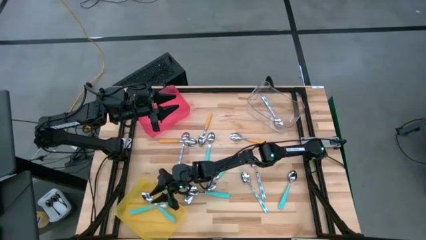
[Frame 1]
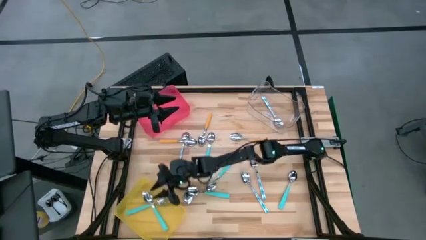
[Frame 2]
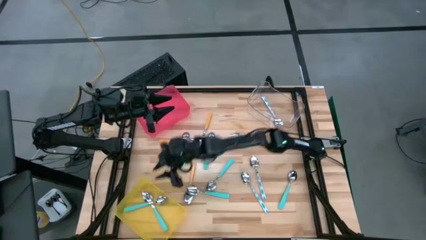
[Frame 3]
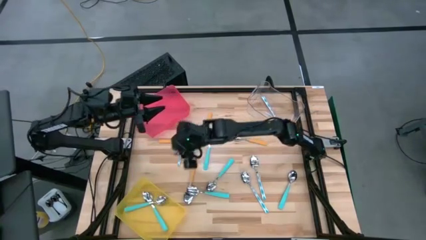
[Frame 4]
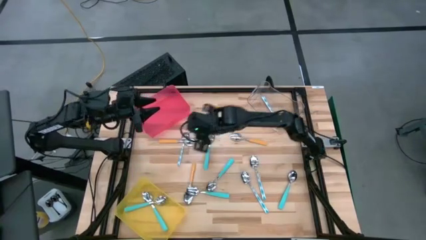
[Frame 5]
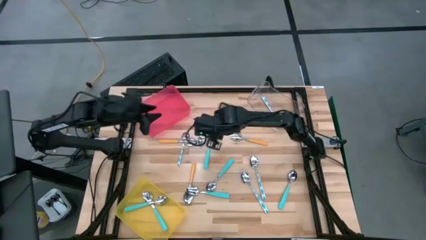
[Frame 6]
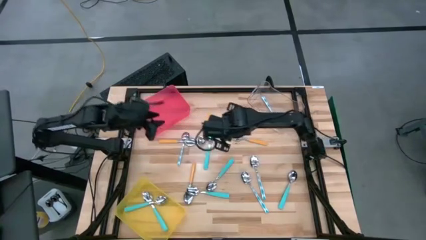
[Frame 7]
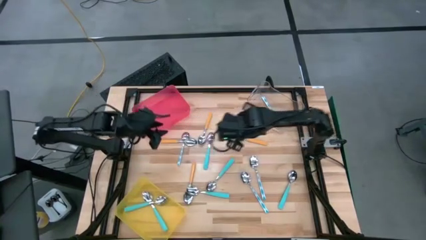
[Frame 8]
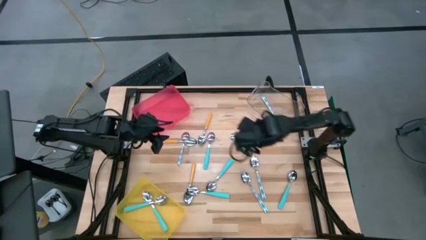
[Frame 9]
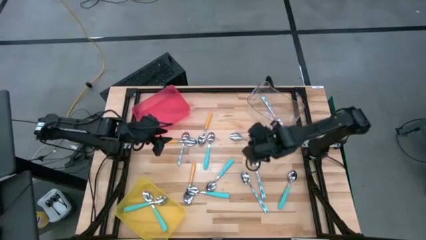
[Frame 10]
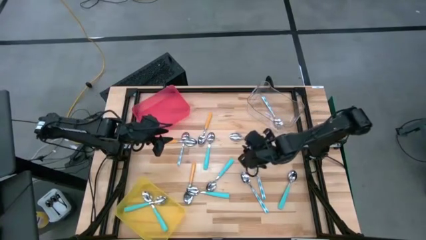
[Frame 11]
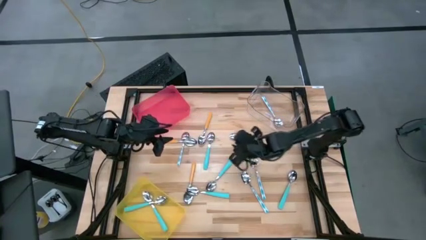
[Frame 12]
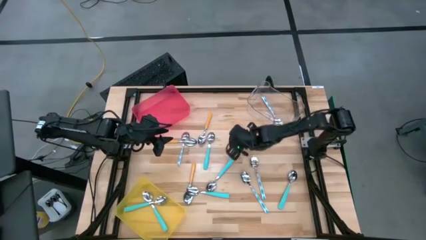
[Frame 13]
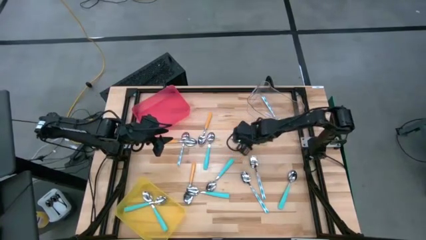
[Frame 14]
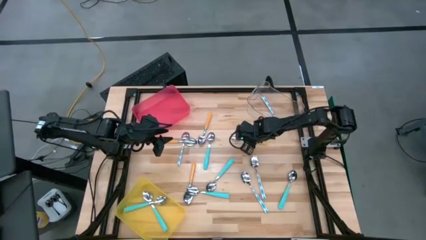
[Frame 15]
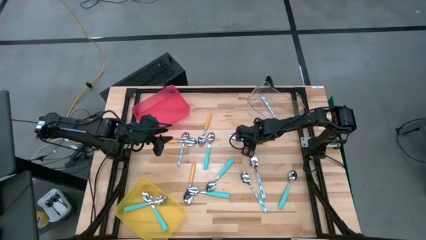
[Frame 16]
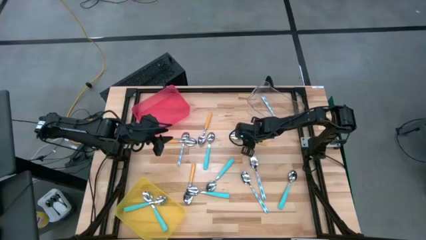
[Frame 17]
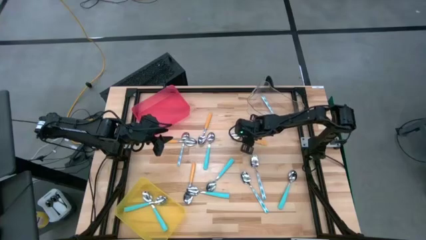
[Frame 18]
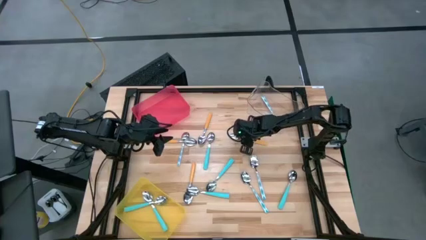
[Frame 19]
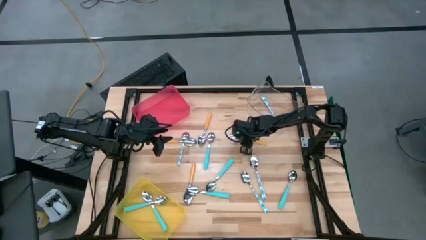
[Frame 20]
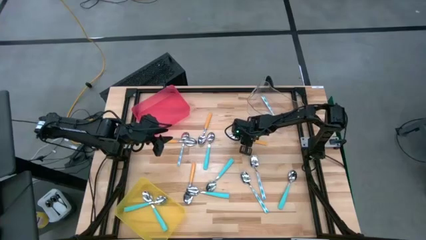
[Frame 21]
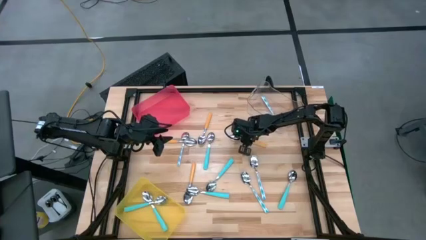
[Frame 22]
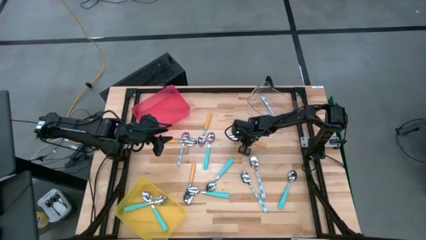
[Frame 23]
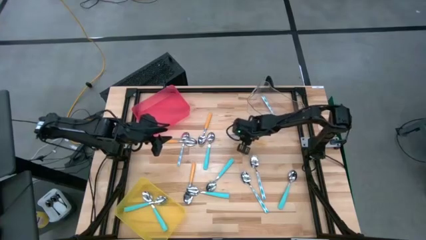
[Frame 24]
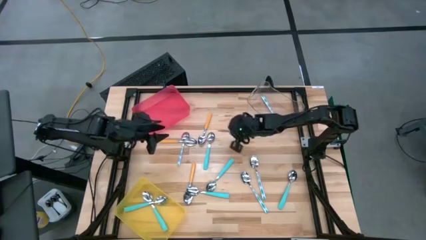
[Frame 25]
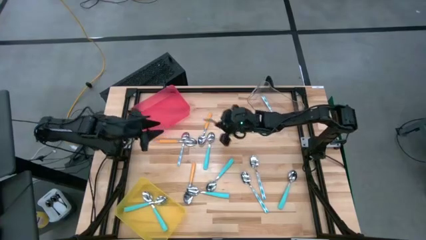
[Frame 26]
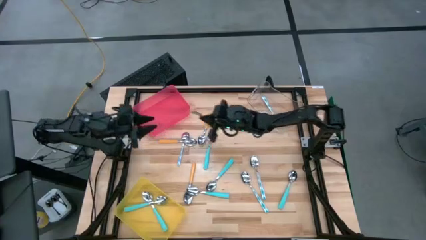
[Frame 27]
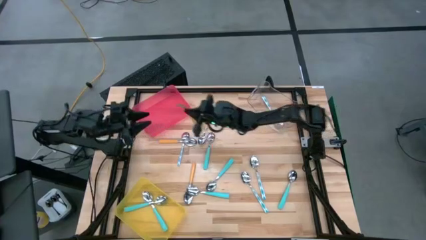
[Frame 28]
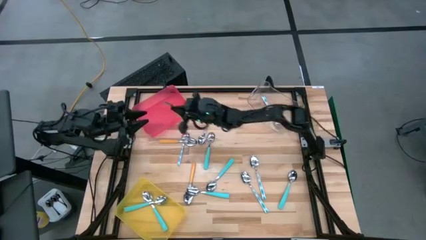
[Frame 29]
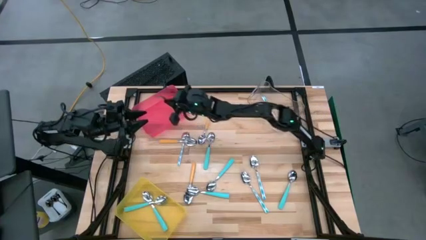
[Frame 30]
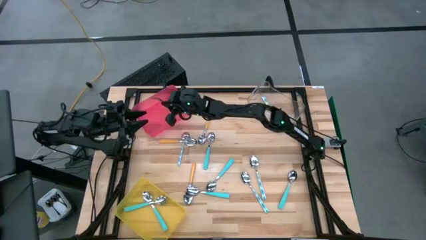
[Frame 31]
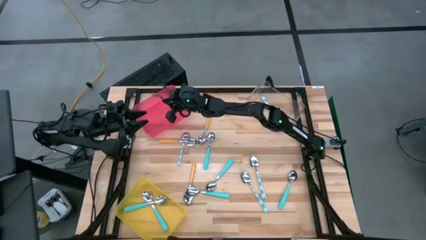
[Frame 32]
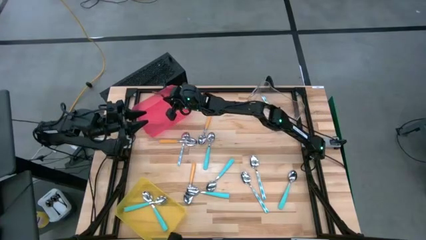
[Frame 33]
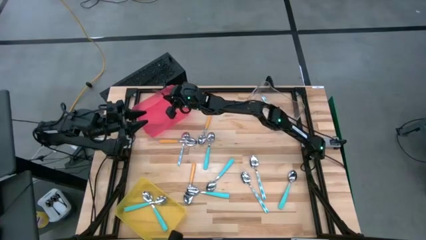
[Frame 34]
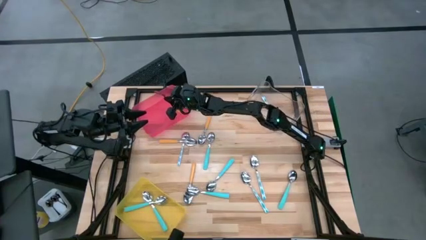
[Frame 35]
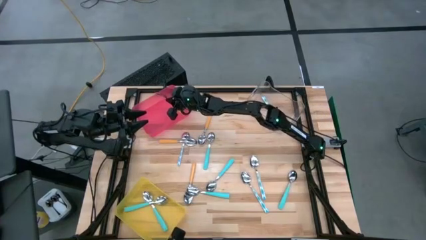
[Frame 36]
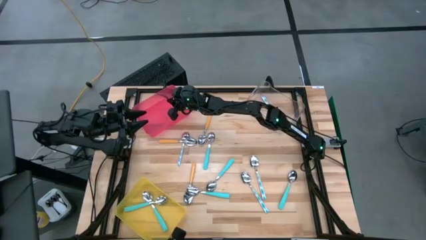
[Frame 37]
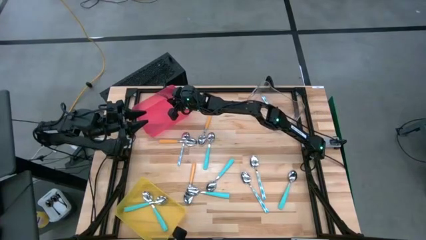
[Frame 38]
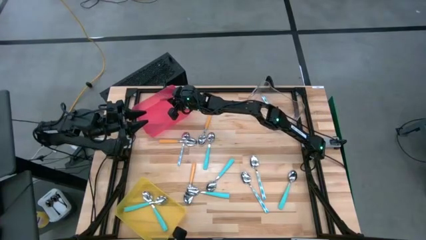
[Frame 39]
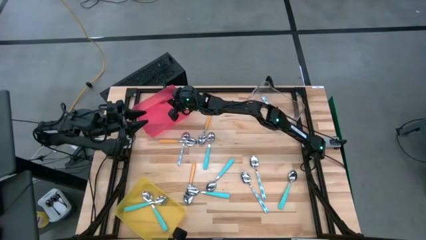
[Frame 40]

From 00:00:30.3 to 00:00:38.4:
Task: Sort silverware by color (type)
Put the orange spoon into the red bin

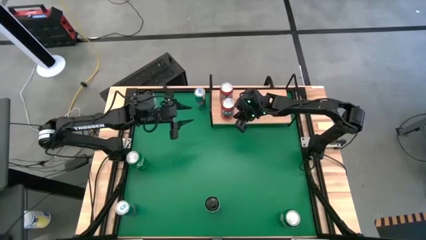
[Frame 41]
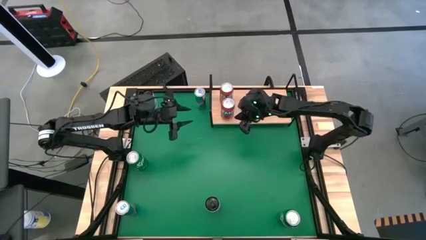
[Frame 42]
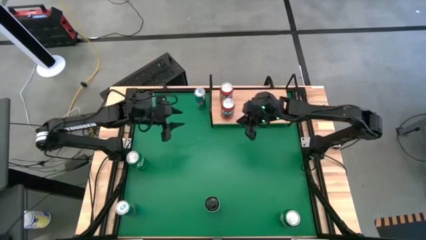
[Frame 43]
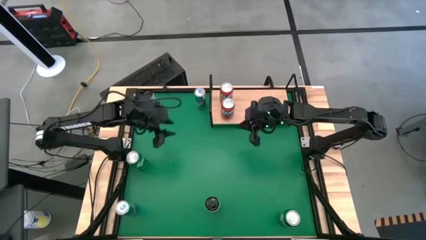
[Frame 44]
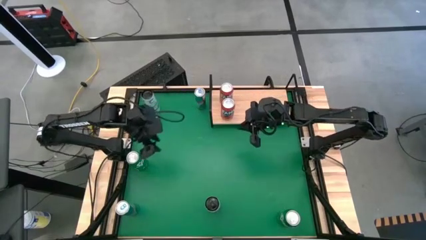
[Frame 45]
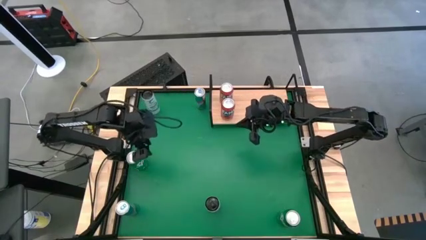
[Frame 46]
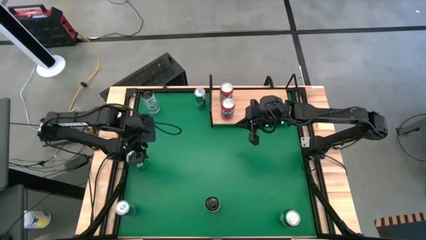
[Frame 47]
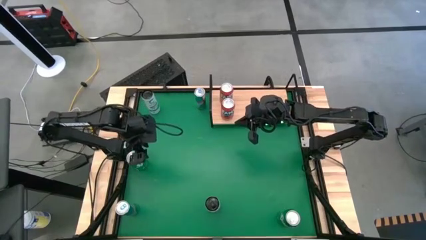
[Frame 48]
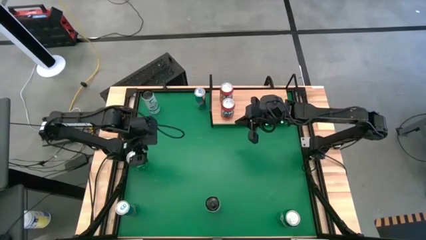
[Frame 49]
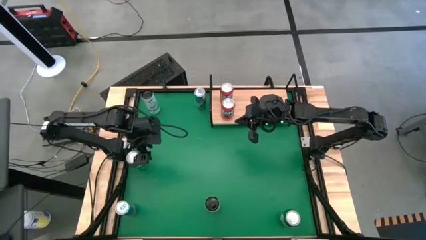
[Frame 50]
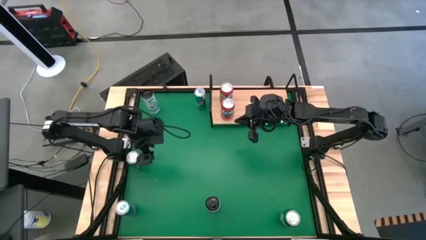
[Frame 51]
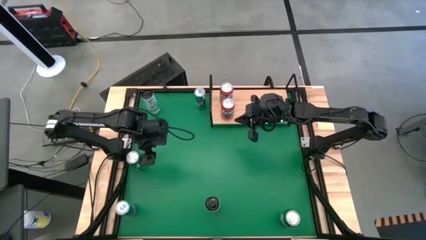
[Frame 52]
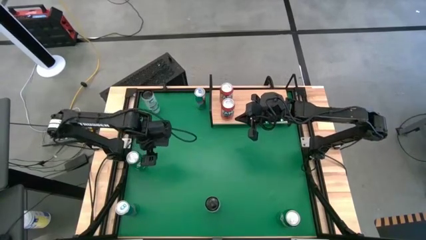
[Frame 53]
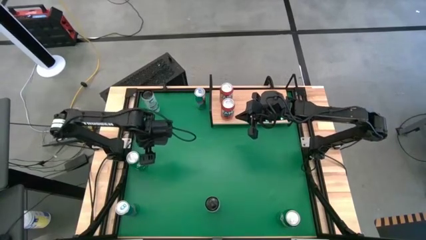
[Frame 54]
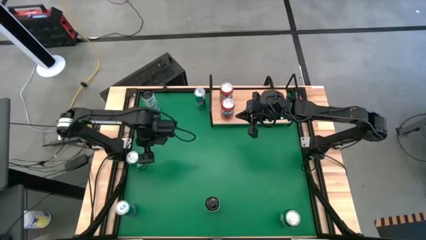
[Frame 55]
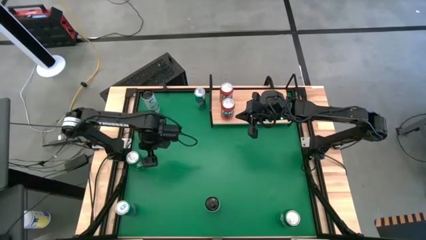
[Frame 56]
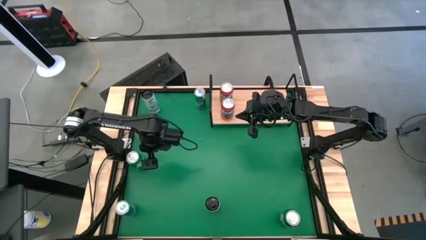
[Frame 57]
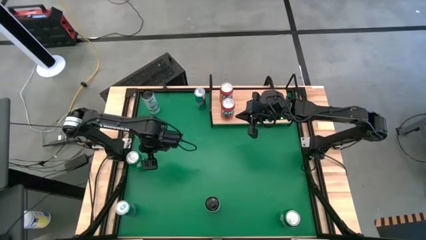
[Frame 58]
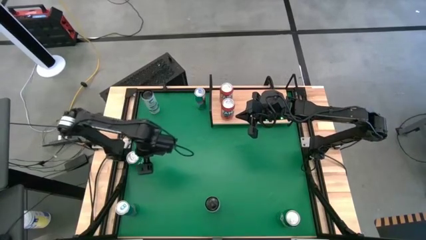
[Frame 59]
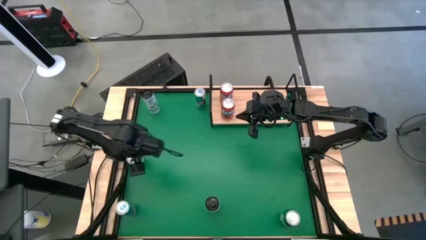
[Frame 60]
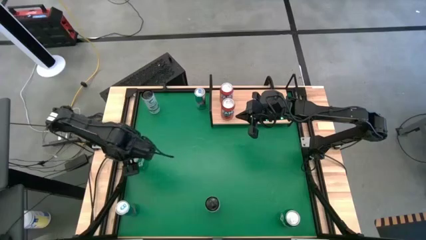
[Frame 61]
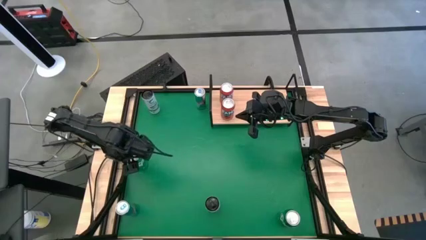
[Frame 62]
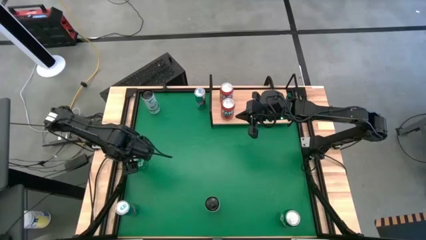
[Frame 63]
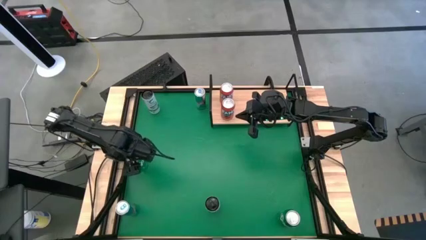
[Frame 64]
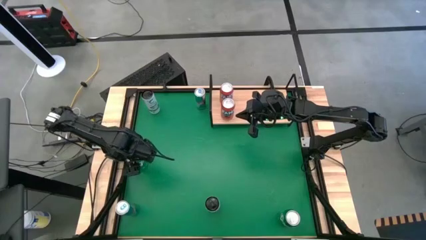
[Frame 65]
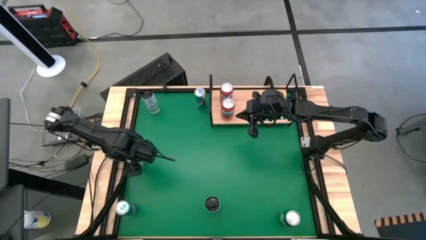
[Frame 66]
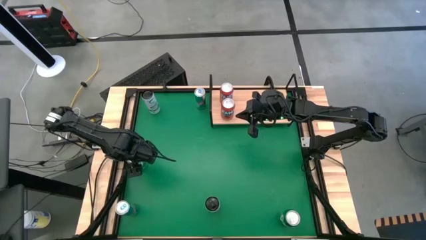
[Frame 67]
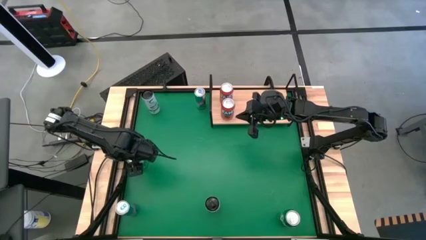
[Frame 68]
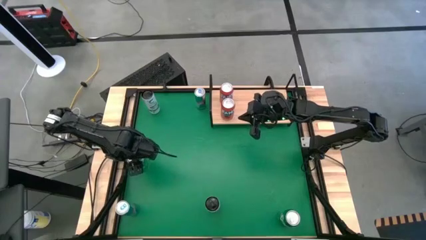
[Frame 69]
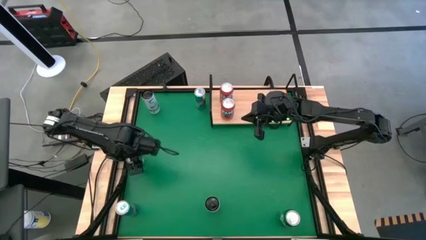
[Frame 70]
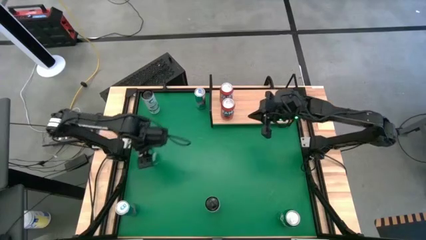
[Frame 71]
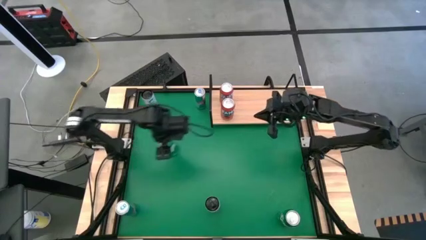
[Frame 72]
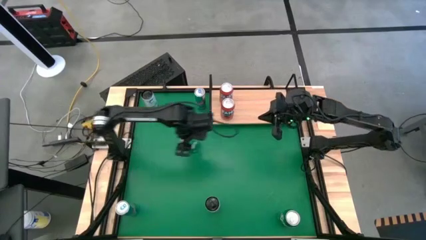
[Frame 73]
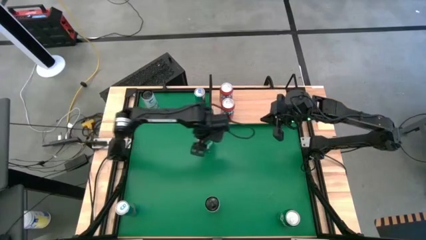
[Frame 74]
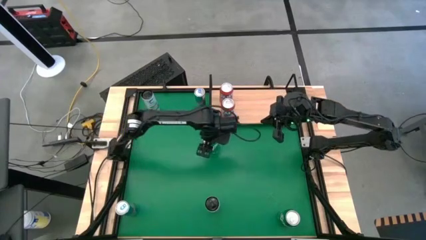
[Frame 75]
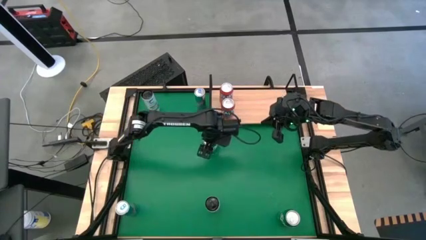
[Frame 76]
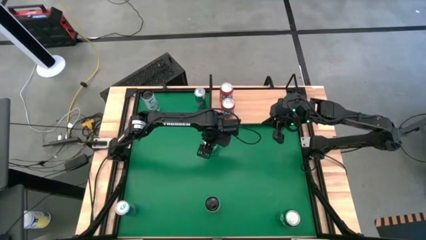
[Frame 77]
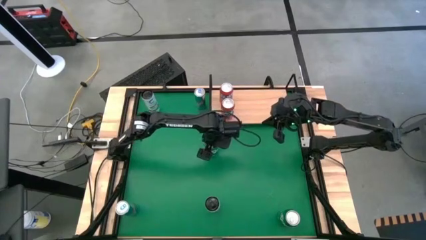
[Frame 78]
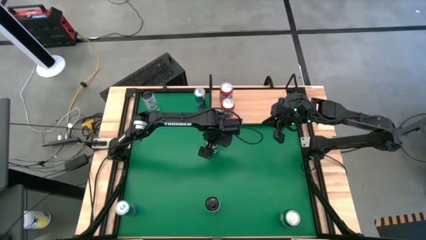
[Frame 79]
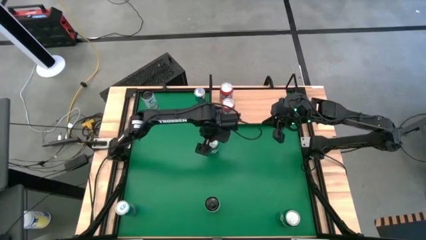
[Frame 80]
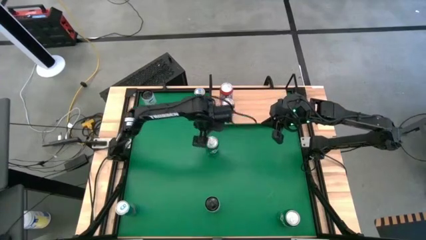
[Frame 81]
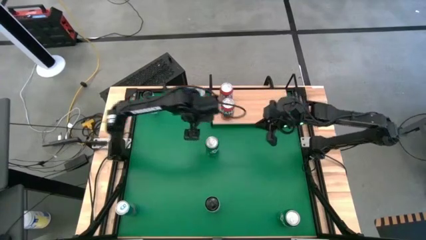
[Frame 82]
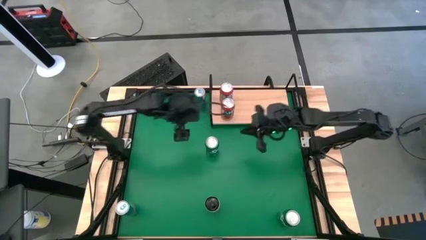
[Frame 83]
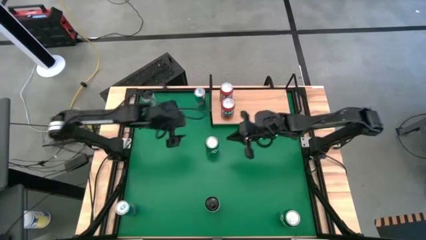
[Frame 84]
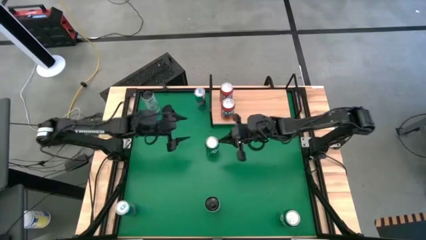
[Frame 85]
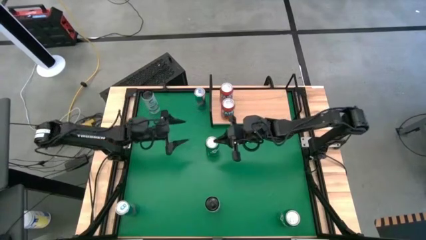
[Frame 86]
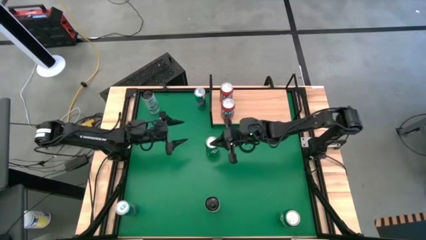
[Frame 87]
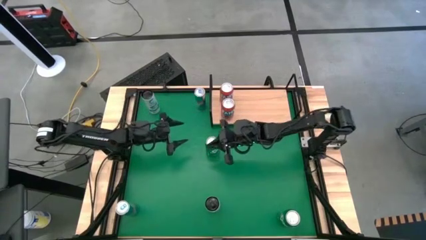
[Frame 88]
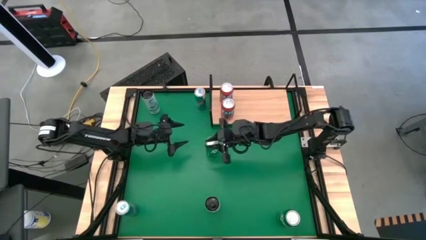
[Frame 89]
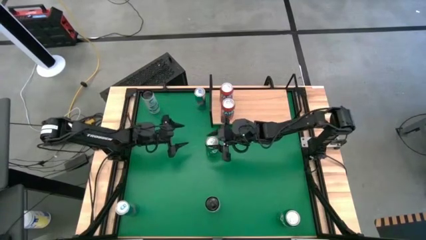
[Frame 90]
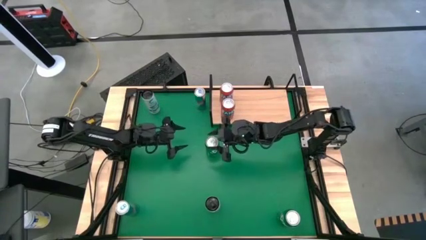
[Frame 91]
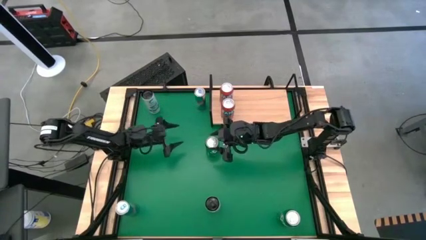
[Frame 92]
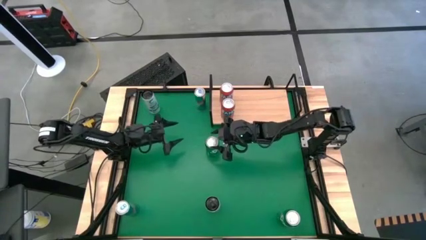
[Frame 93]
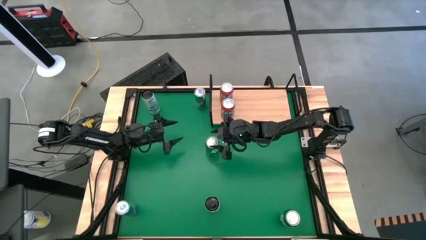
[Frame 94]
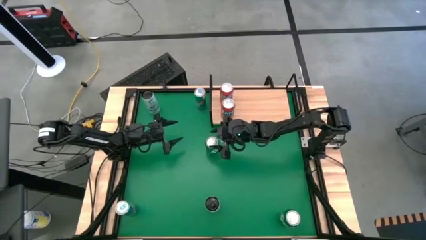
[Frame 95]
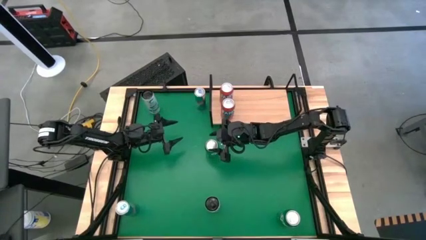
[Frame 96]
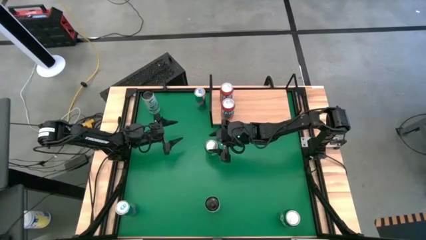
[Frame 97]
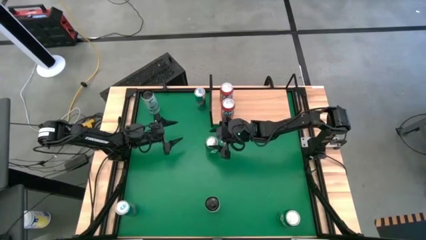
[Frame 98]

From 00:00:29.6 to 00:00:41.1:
Task: Place canned beverage on shelf
Put the top green soda can on the shelf
